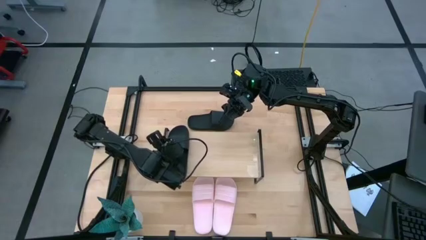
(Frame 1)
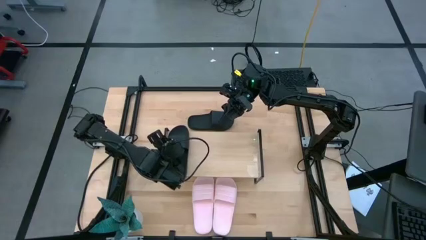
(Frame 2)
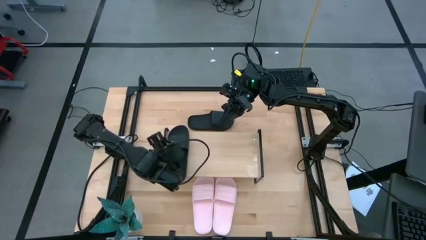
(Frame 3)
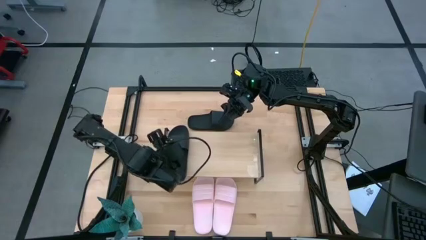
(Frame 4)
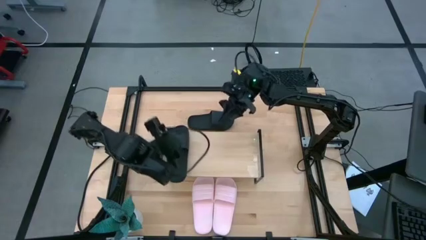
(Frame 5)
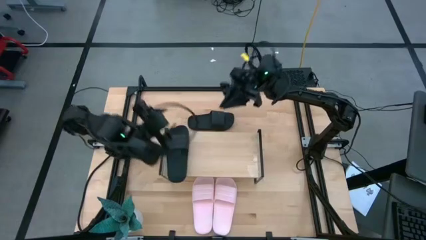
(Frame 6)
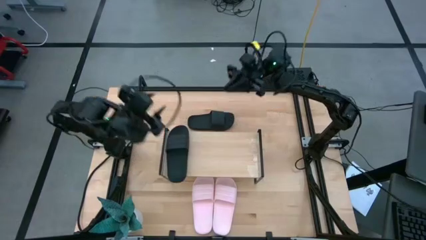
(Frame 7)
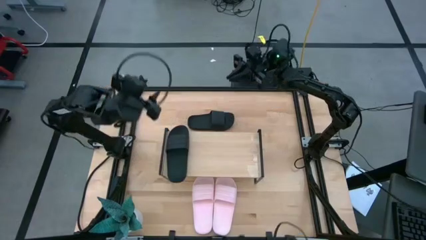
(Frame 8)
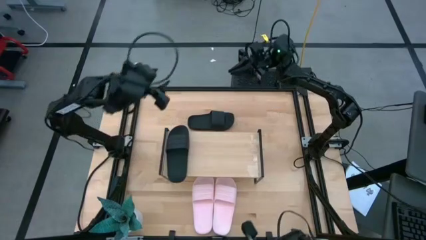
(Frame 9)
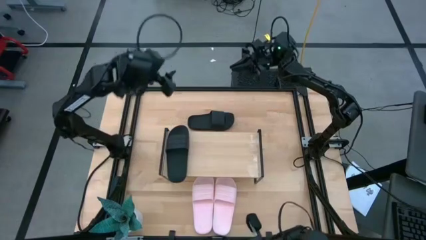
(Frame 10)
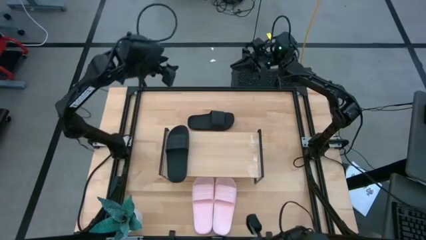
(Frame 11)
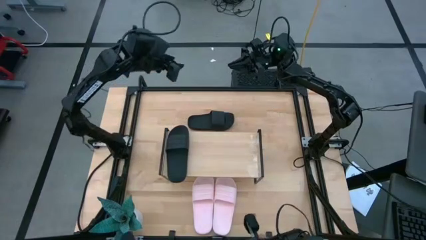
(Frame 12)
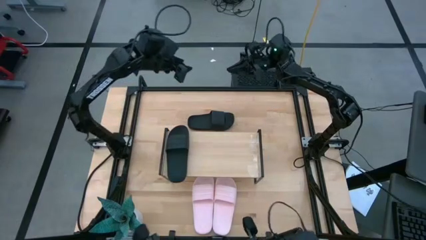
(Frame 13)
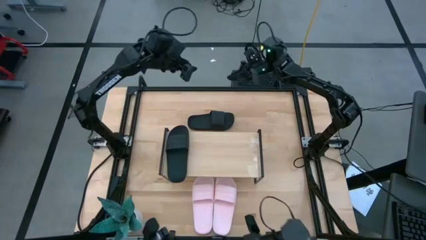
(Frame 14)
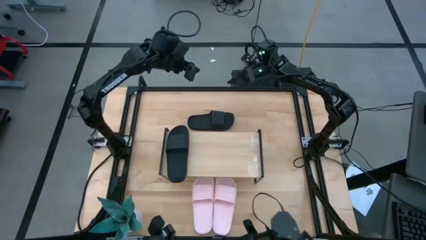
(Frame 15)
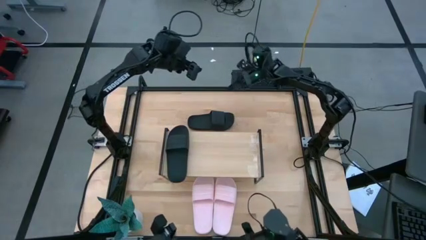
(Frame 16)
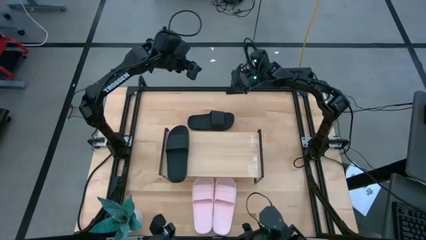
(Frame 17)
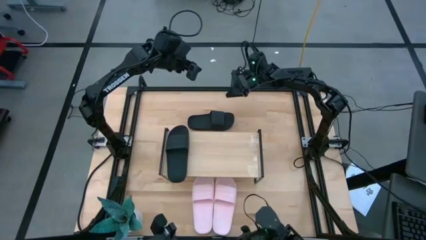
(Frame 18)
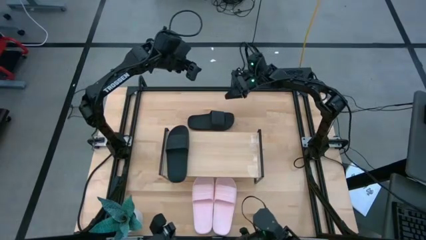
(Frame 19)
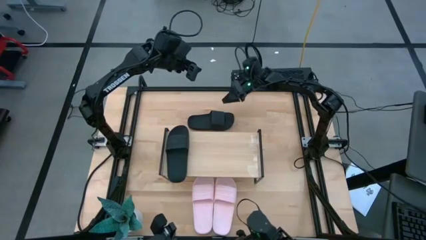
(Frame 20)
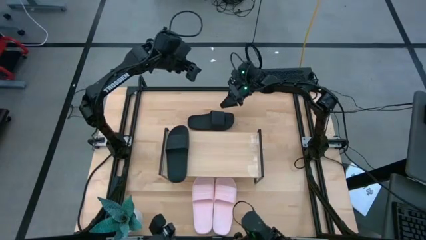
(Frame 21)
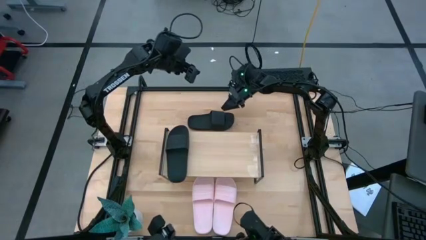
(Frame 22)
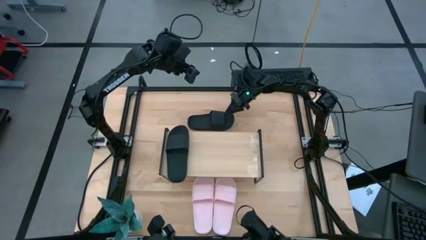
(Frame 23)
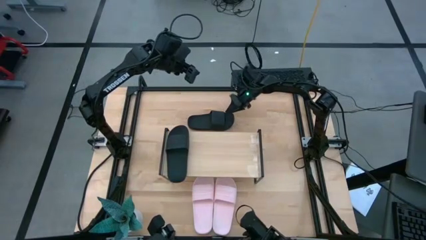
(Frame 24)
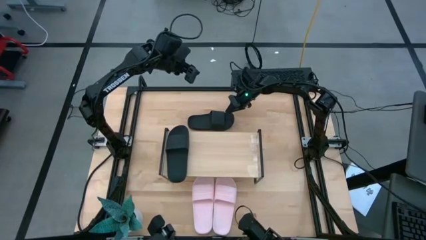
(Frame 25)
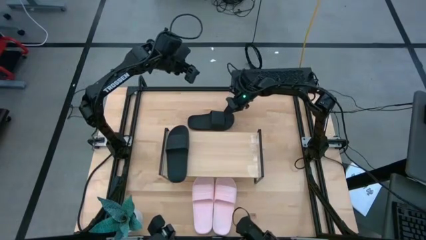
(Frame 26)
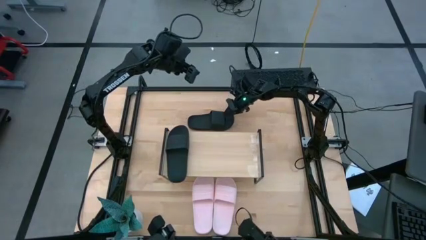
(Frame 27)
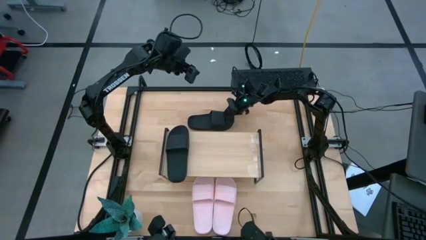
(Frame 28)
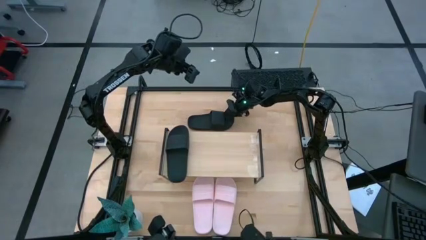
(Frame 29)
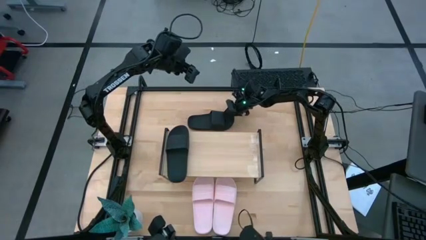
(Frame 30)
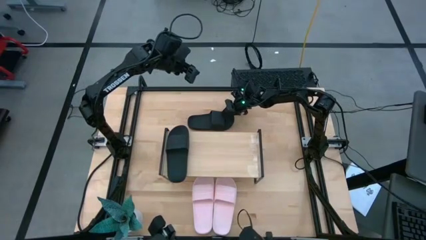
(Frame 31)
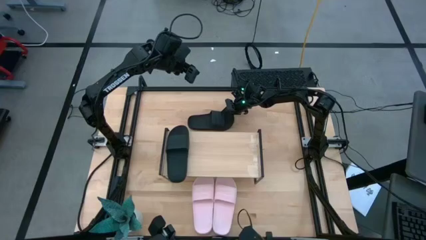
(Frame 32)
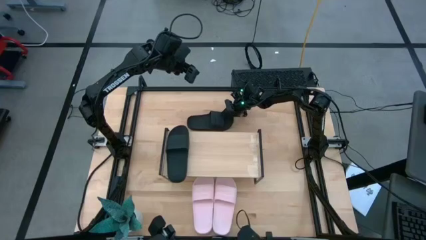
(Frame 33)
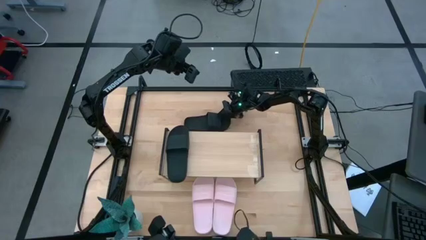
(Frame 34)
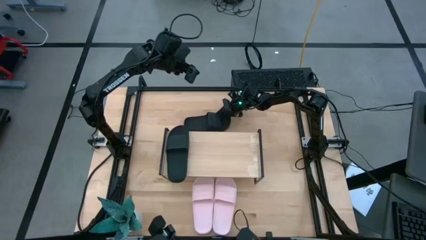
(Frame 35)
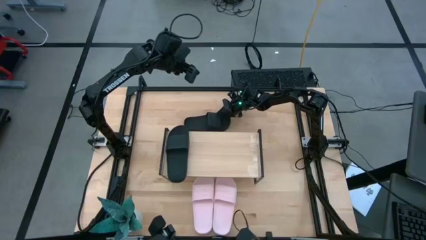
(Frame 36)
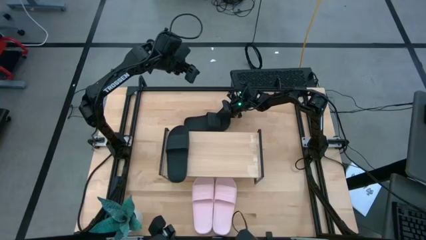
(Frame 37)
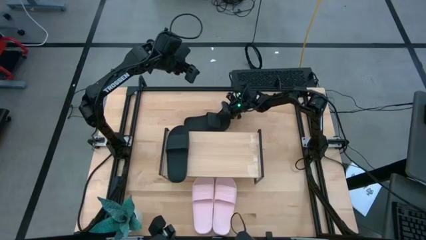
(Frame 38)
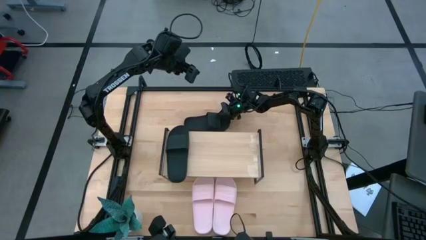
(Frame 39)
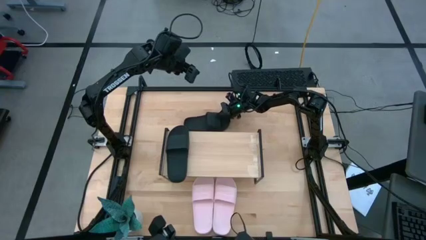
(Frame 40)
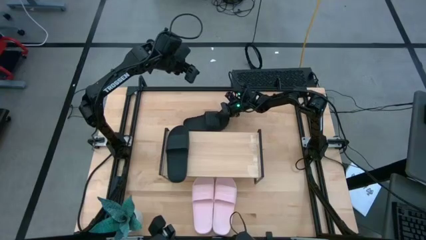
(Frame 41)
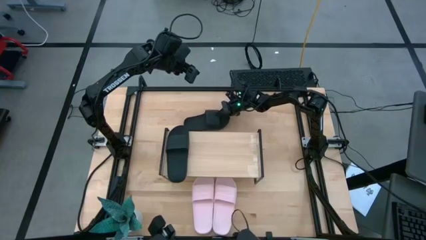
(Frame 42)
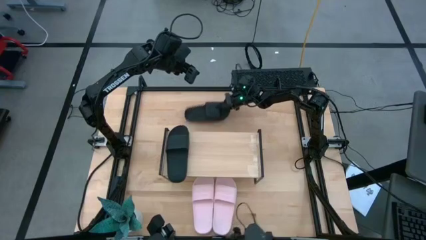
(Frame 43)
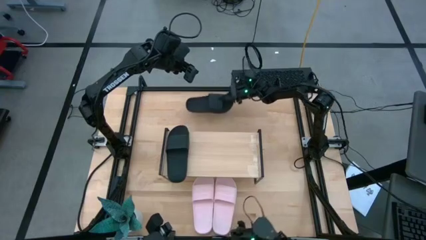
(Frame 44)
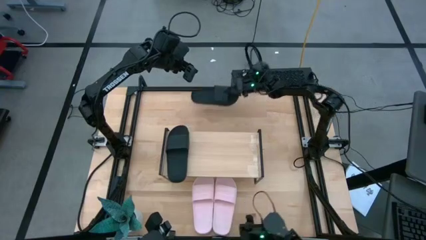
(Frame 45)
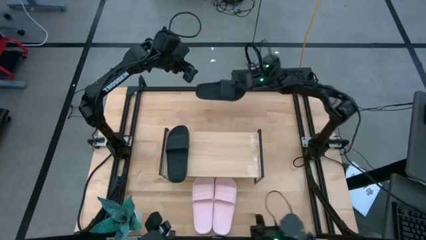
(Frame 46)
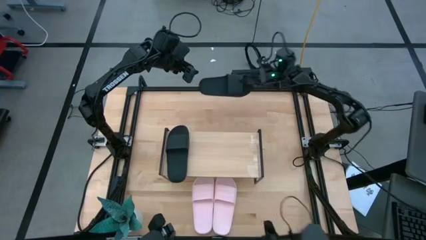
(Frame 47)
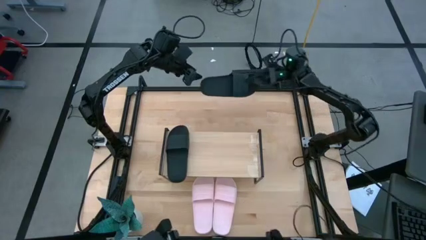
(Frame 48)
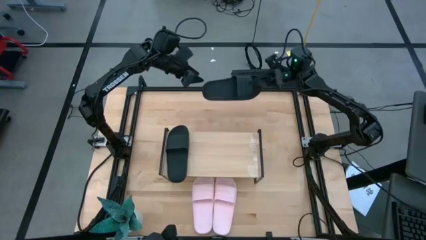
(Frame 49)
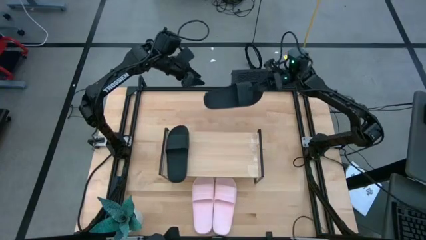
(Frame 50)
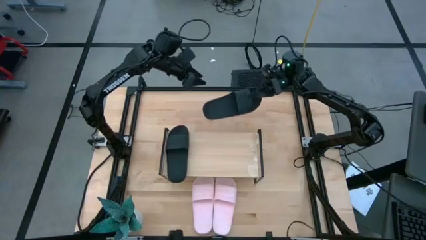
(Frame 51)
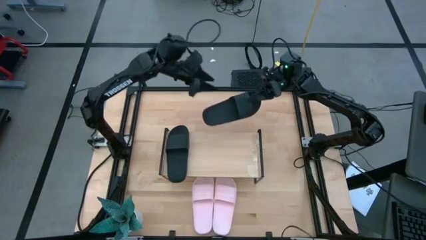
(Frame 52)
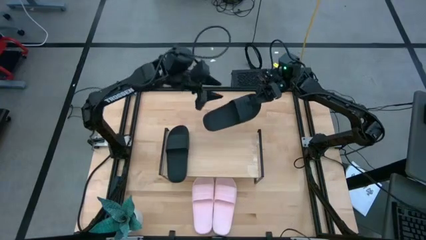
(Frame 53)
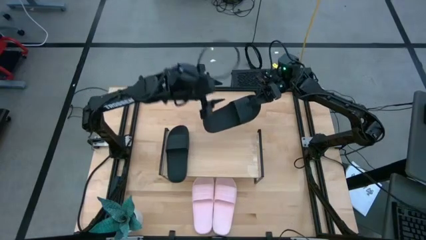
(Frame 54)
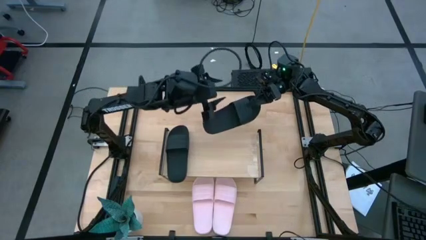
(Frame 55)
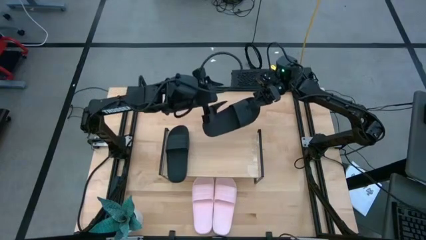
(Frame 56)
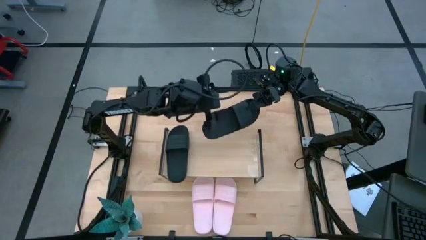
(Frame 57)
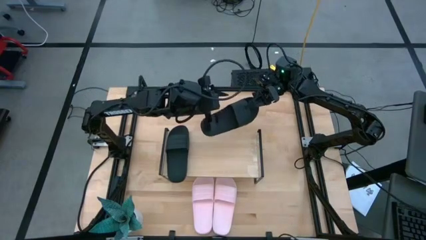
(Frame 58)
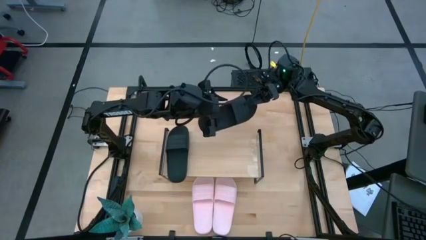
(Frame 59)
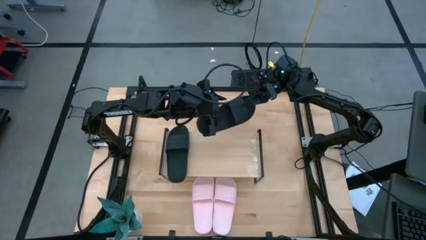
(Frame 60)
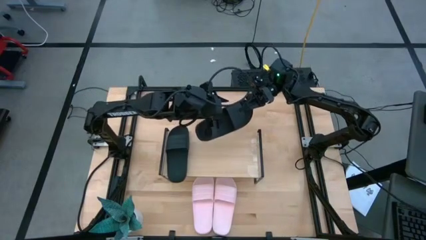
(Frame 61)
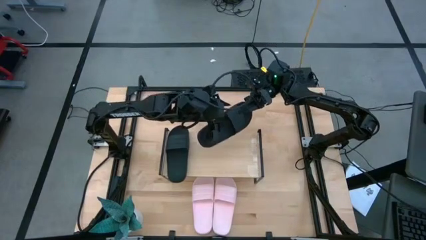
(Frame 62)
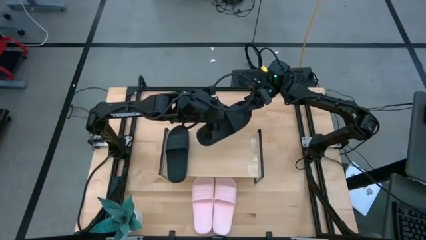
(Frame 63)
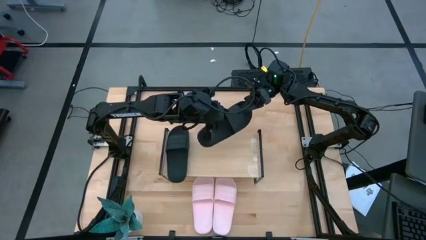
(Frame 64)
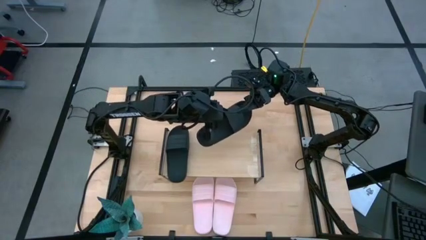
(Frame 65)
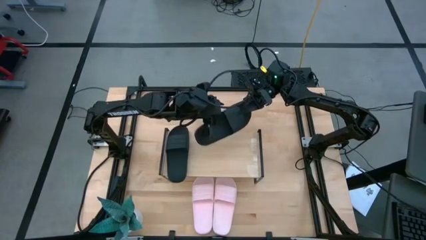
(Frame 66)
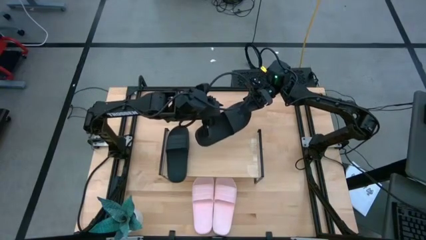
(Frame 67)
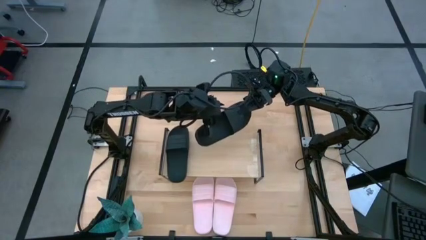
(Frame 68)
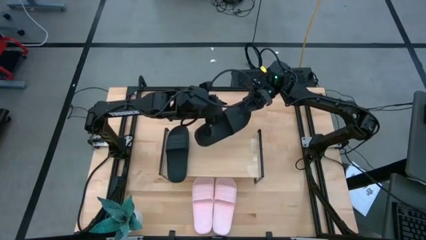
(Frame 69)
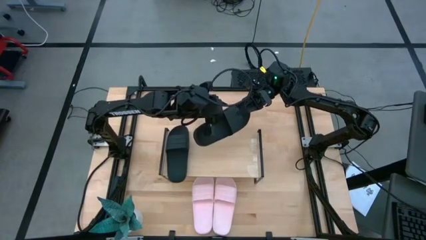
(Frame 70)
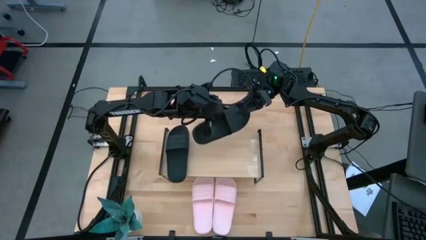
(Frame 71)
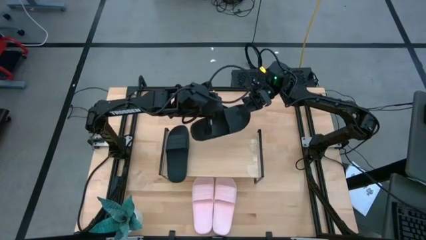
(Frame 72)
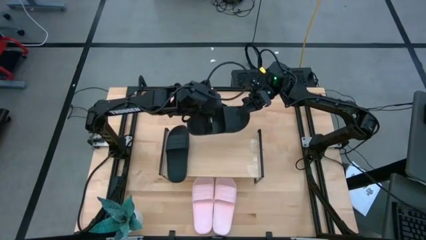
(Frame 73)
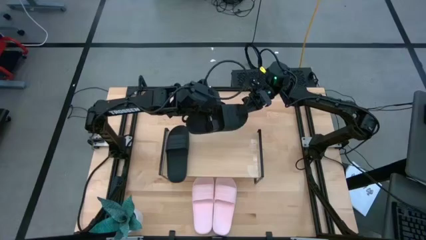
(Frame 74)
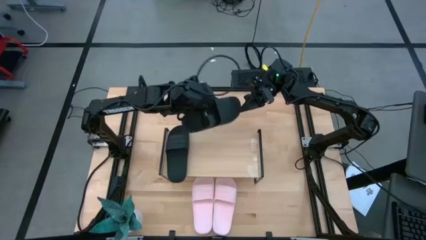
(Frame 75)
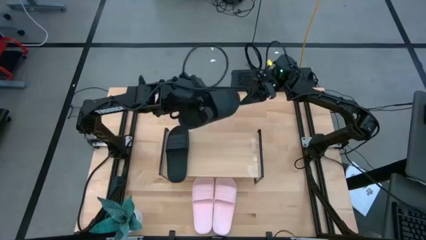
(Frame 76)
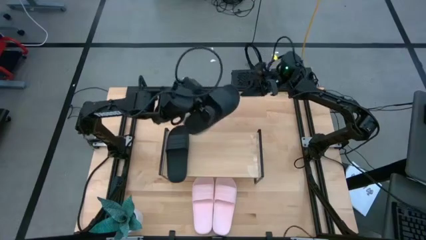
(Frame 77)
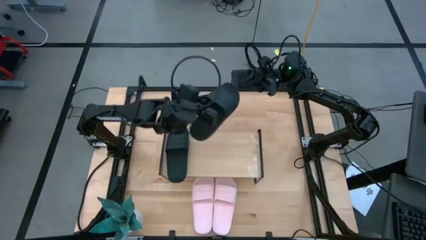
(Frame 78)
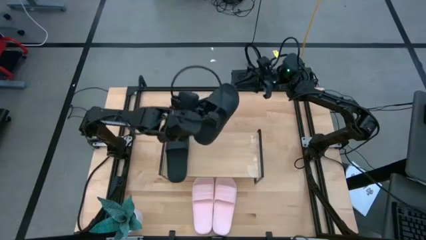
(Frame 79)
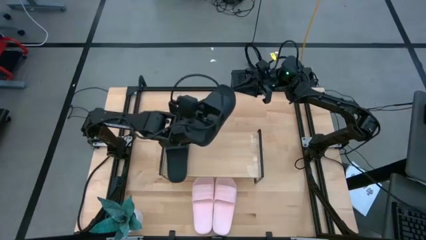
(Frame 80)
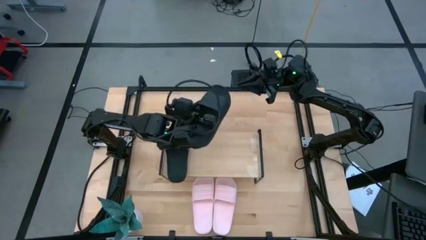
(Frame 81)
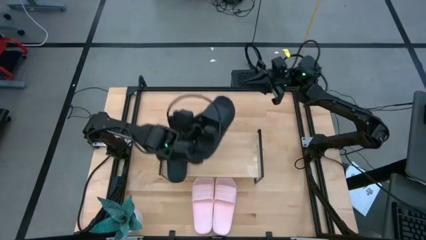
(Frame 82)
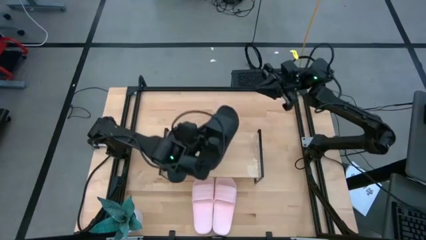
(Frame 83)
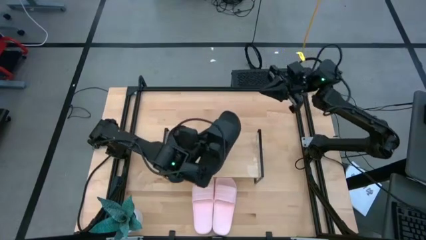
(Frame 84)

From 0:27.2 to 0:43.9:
Task: Pick and place slides into the shelf
Put the black slide on the shelf
